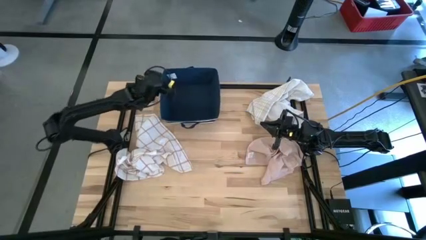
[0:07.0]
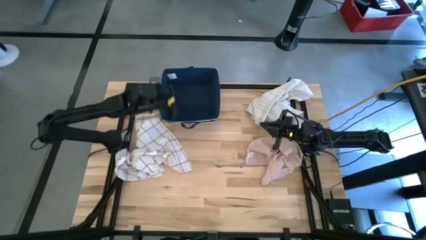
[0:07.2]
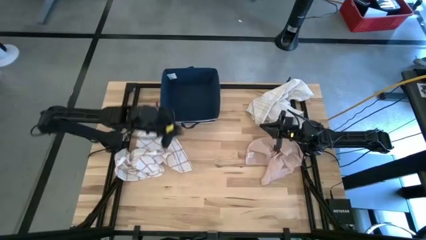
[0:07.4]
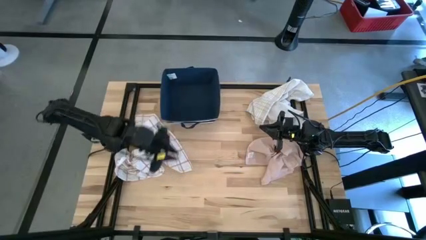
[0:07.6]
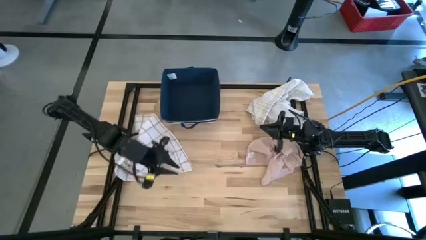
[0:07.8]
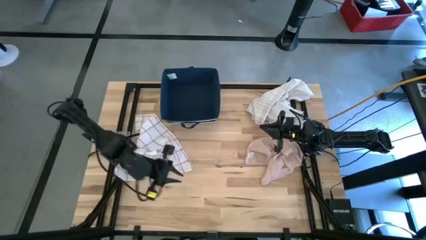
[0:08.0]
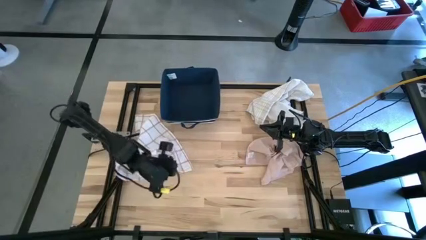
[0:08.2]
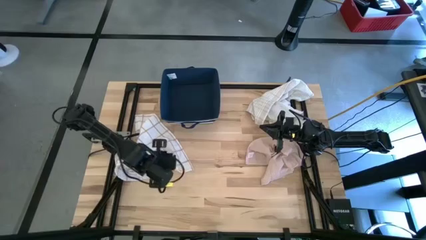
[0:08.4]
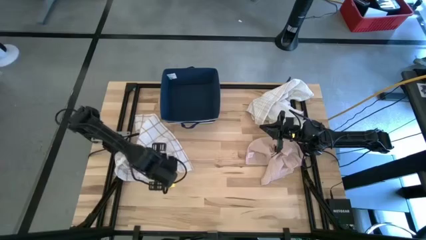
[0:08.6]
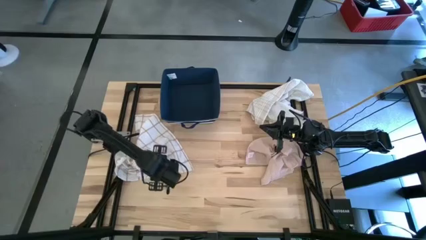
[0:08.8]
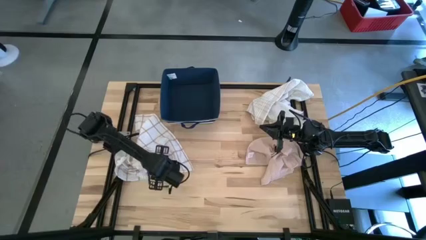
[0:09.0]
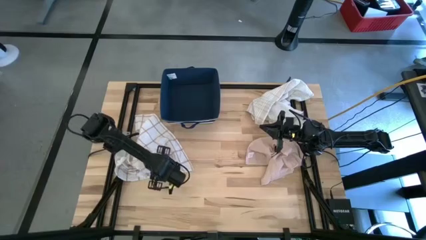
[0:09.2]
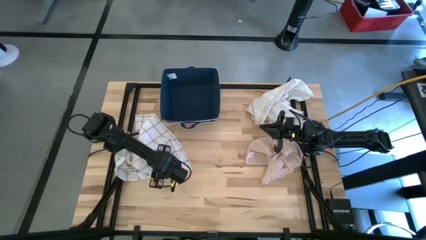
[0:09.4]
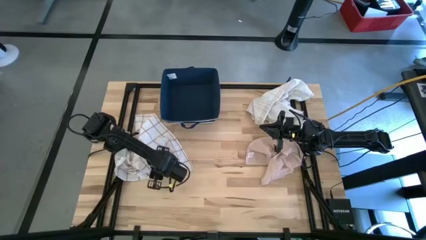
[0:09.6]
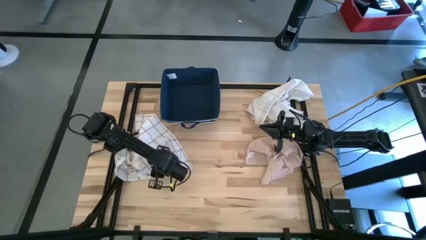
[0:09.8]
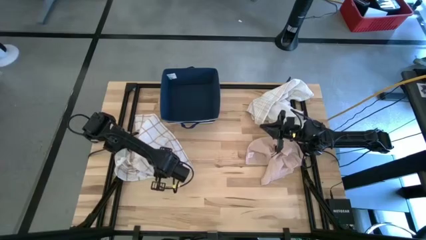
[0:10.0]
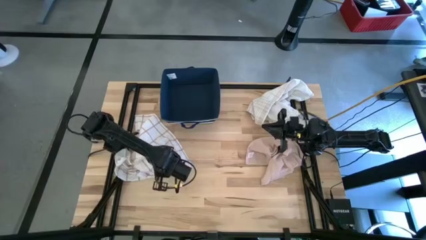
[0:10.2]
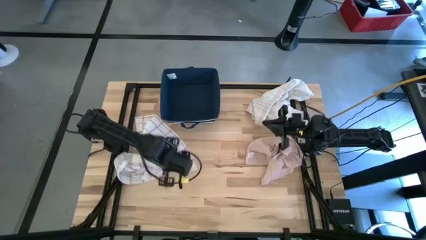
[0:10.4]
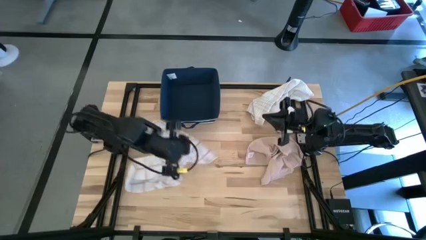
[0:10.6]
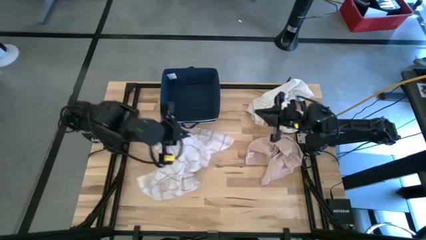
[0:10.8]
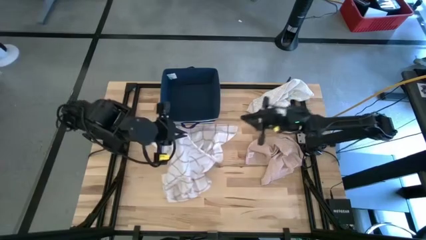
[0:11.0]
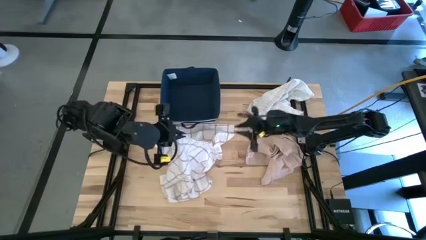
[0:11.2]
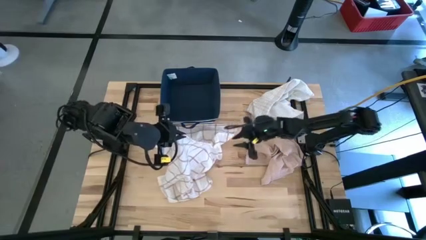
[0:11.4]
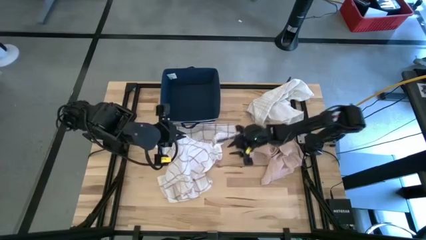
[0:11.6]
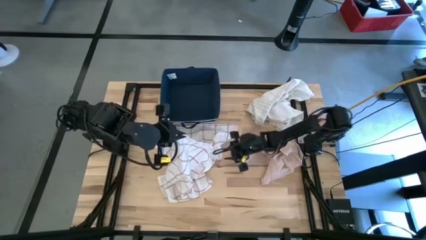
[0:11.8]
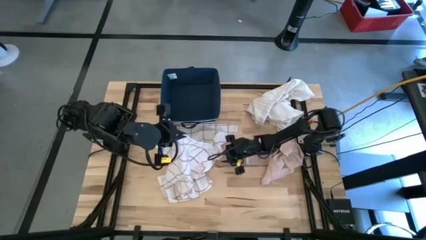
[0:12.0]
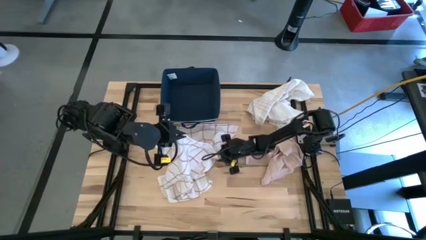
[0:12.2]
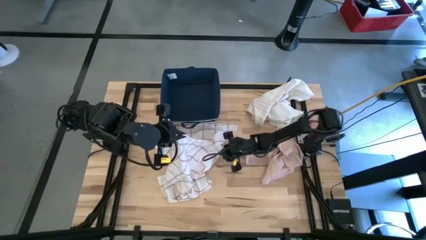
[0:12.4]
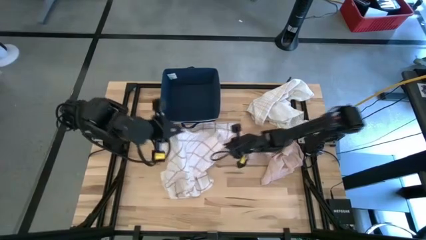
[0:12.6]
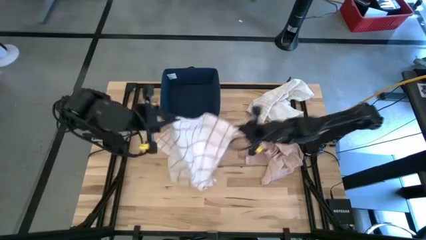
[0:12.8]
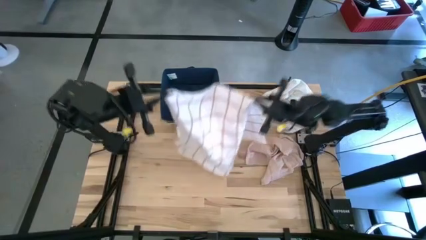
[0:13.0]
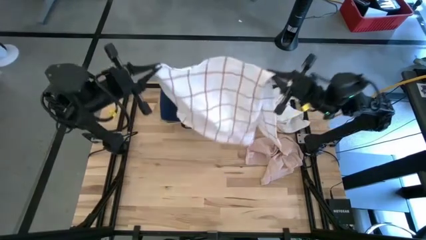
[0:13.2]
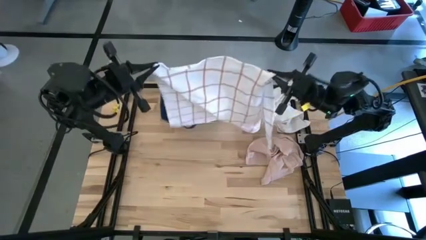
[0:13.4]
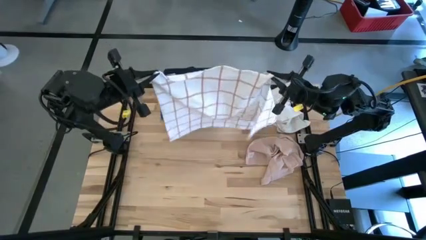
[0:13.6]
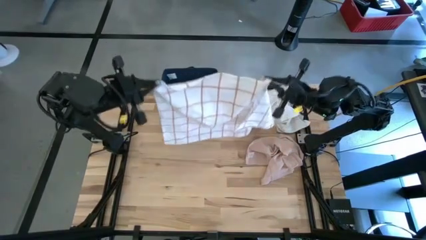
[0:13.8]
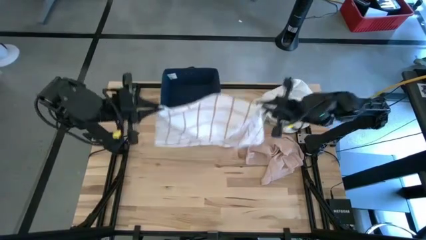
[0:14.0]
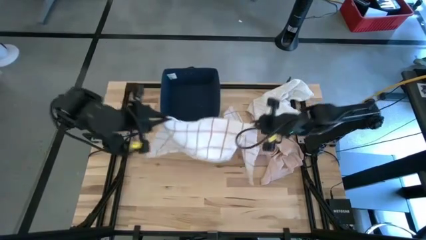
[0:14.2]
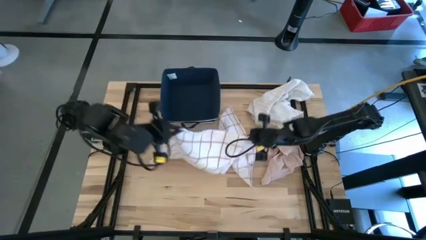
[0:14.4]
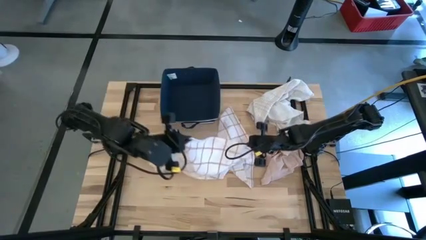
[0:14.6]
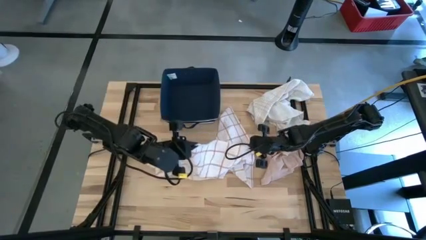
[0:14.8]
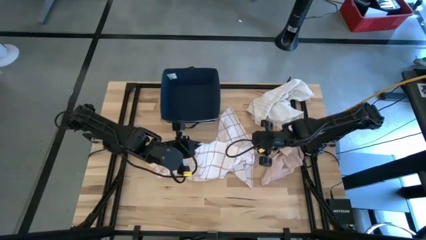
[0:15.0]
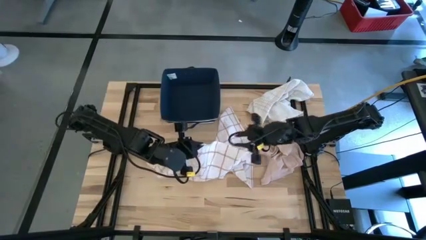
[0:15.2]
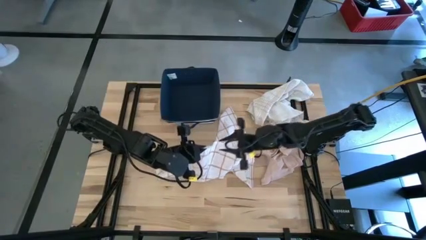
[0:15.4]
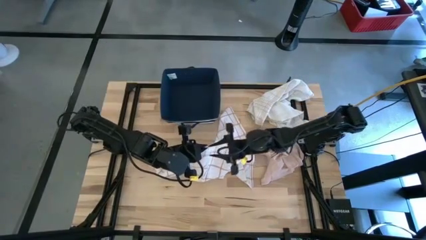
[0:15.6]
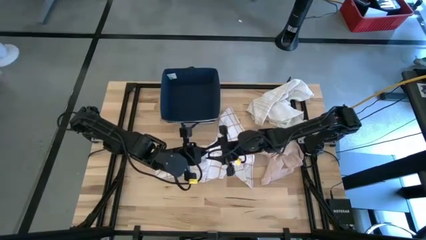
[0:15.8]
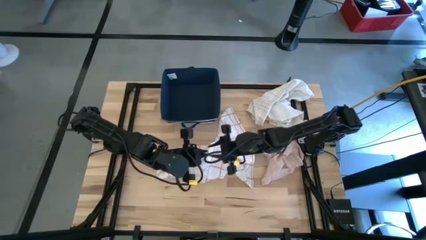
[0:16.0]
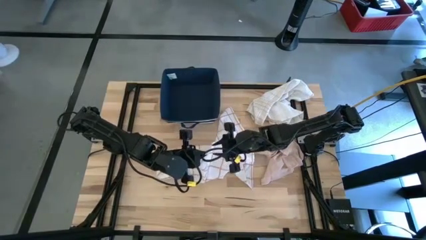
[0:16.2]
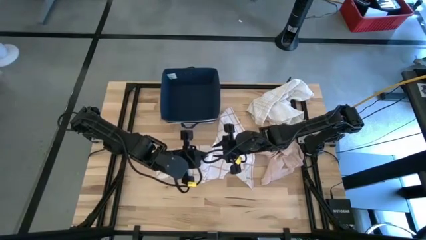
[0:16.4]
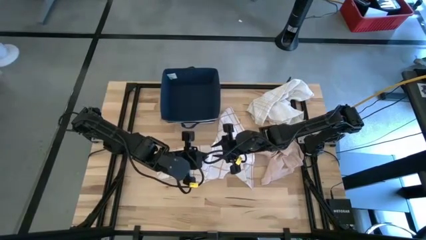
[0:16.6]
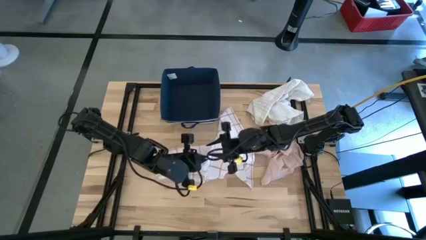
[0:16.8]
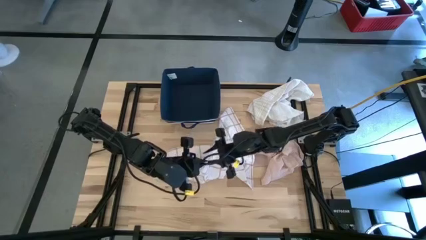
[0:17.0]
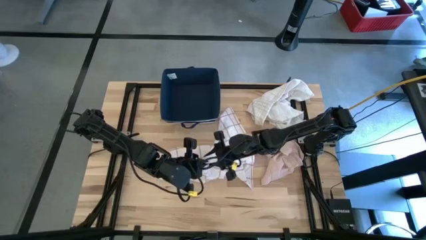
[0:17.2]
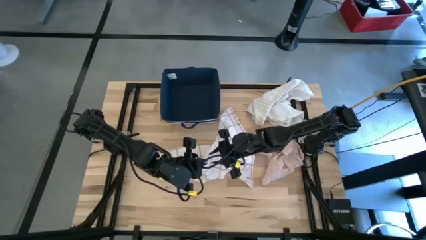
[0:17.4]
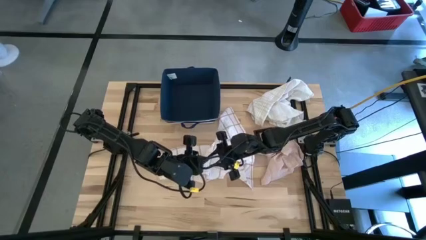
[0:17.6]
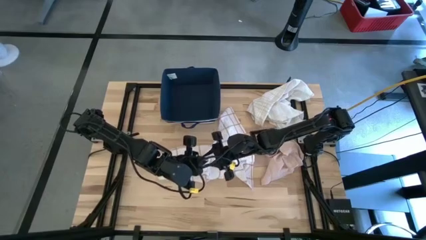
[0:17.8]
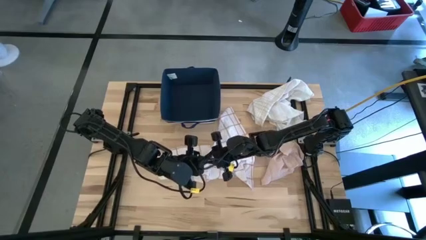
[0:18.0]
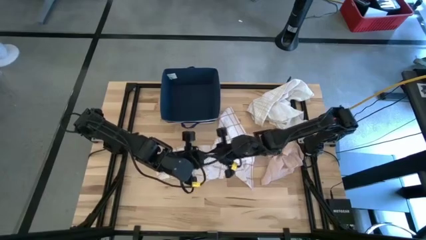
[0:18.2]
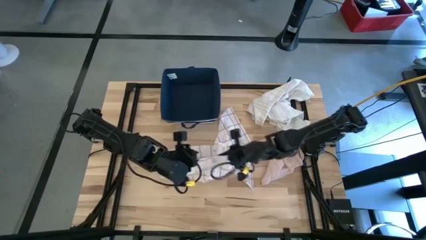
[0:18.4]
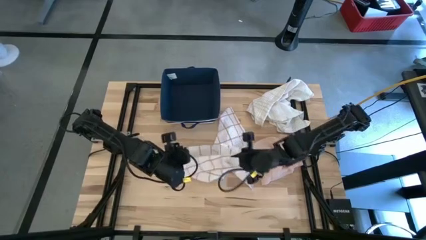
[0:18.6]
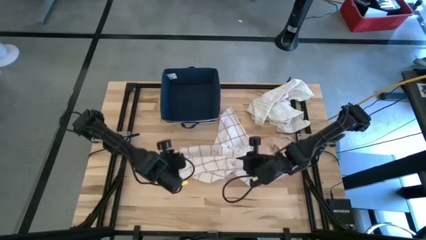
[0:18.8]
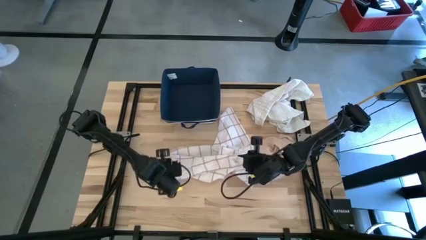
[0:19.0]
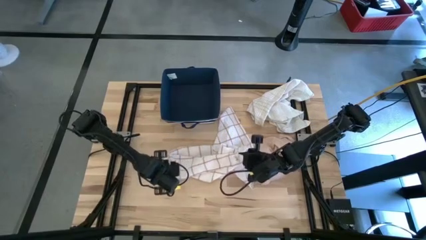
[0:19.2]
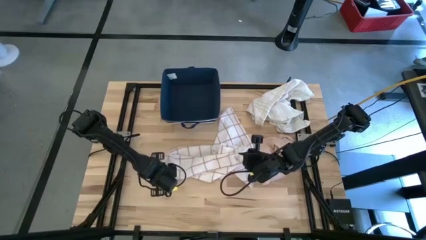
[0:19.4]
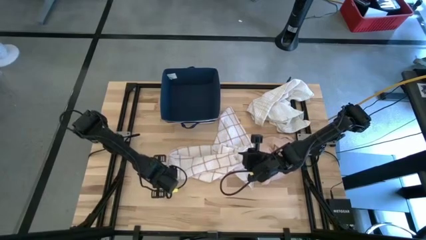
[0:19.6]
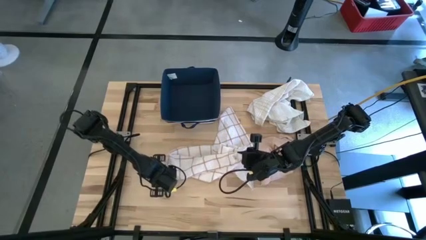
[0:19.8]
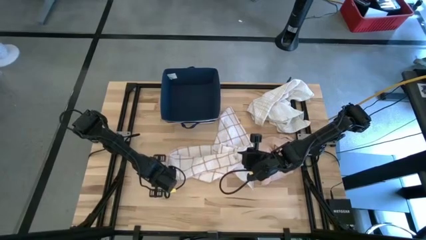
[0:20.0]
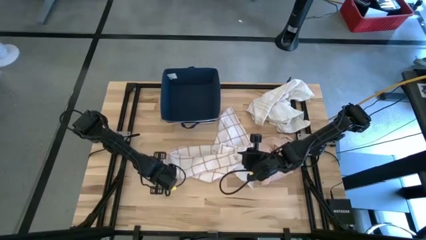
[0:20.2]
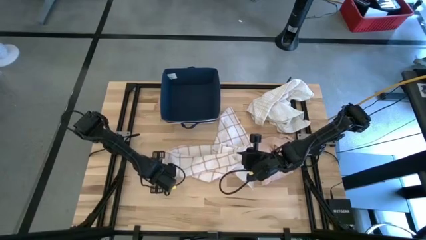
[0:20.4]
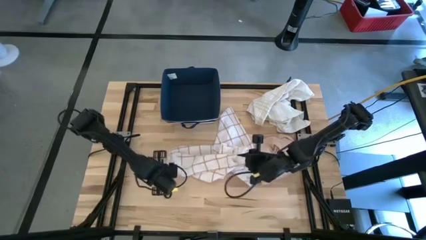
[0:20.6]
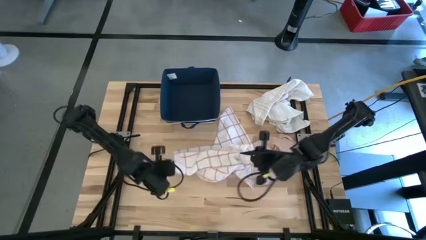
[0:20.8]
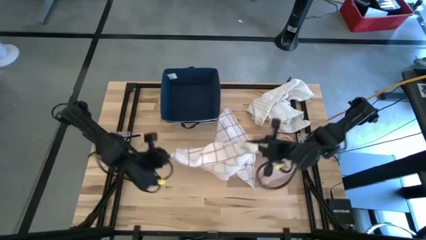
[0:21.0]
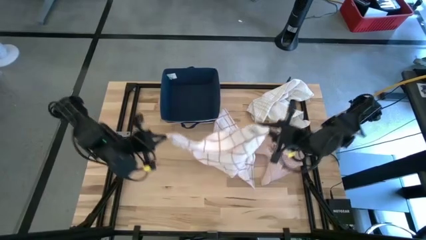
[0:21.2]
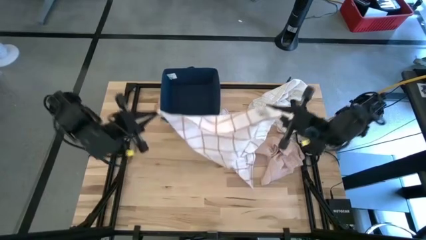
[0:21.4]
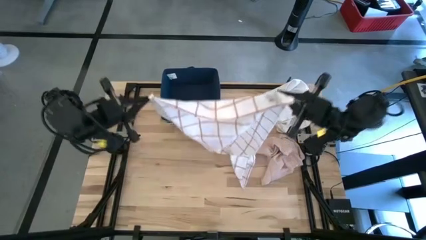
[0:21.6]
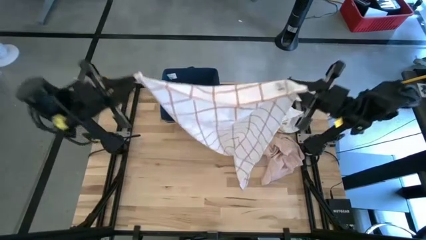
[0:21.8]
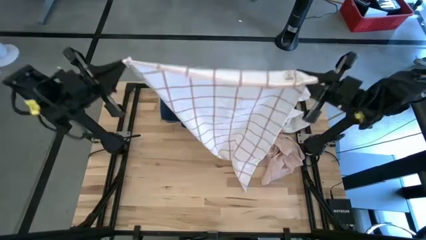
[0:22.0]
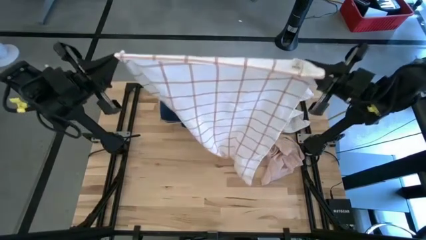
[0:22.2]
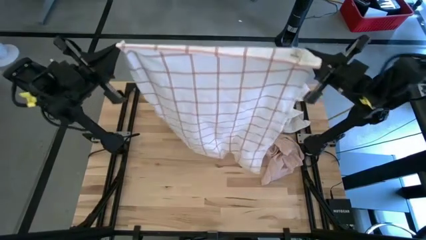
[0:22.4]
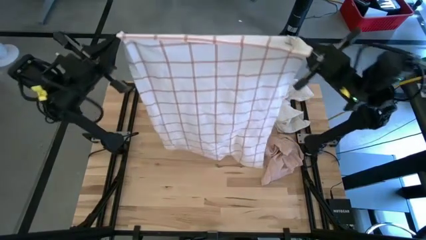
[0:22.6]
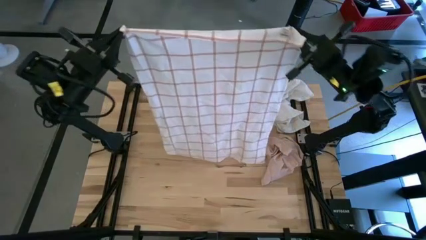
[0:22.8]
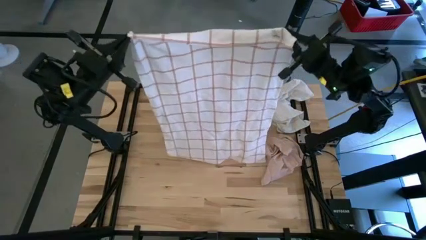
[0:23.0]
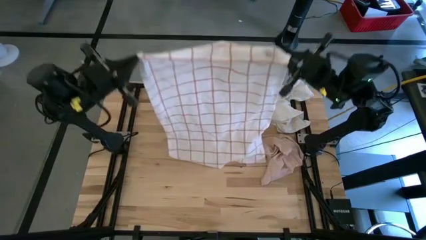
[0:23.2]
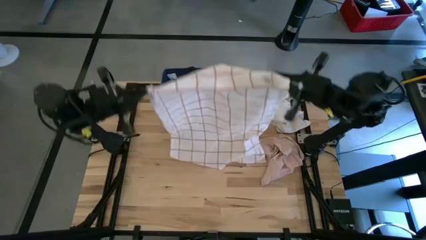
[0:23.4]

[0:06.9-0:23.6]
Task: Fold towel
Fold the left white patterned towel
